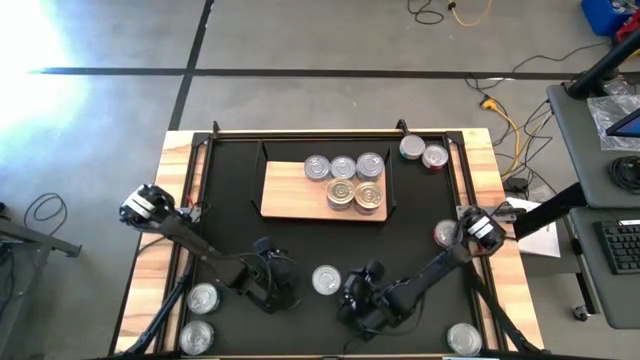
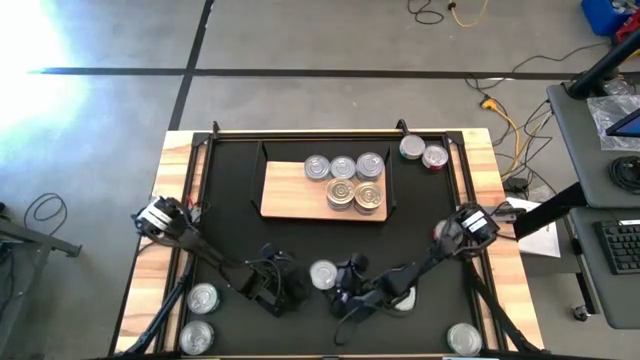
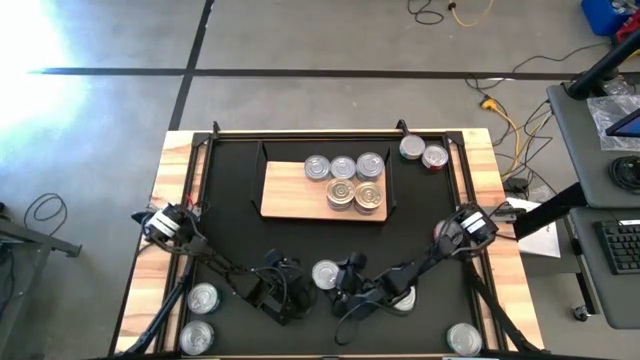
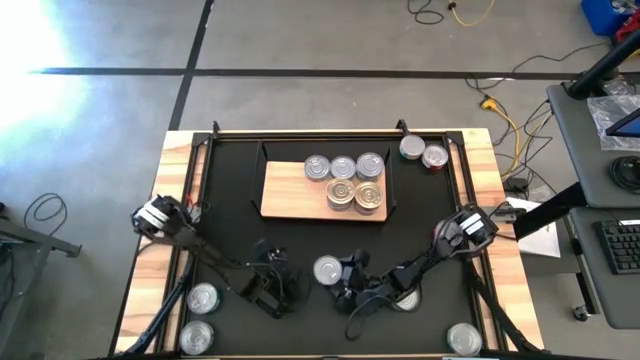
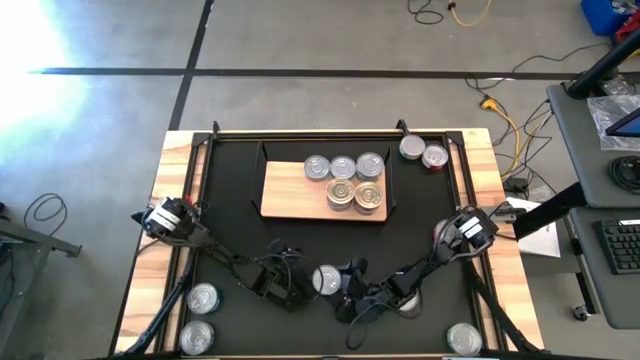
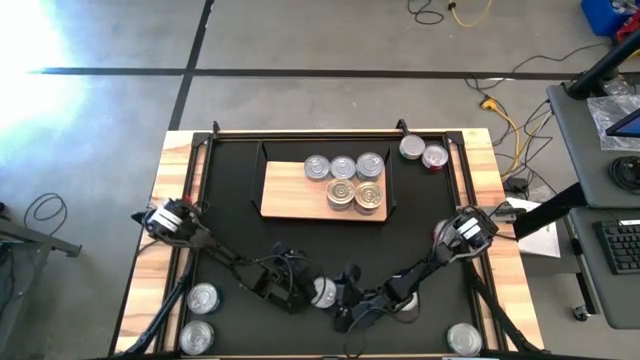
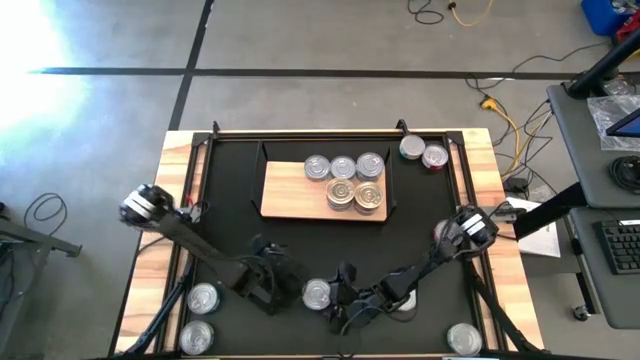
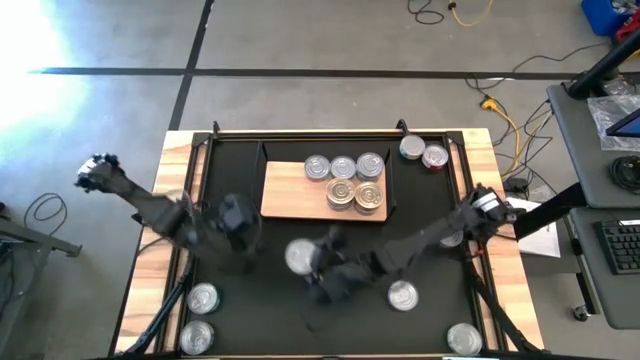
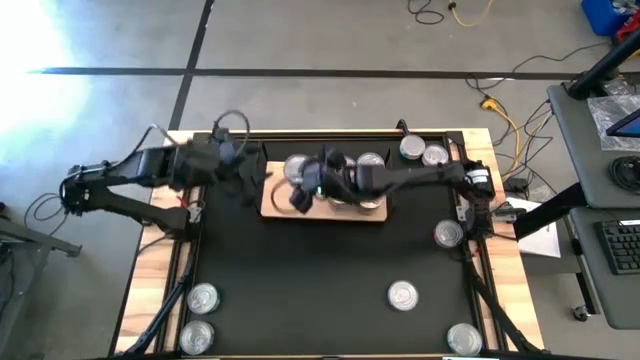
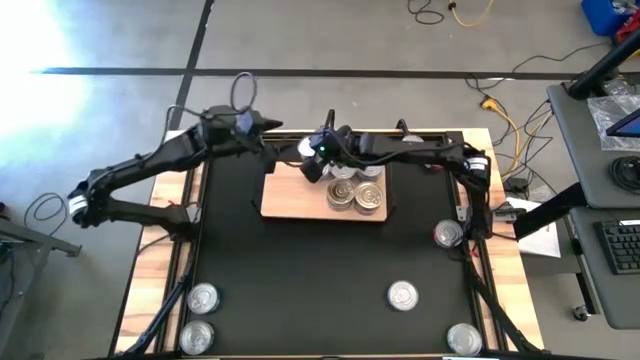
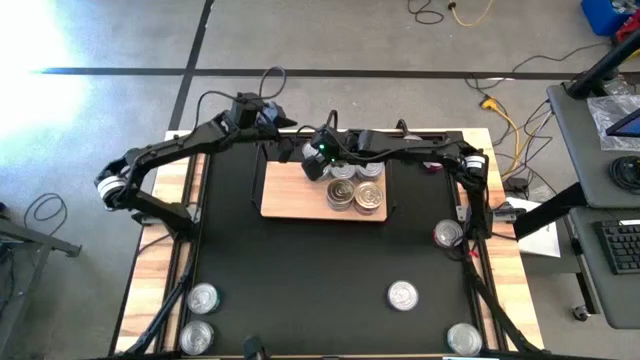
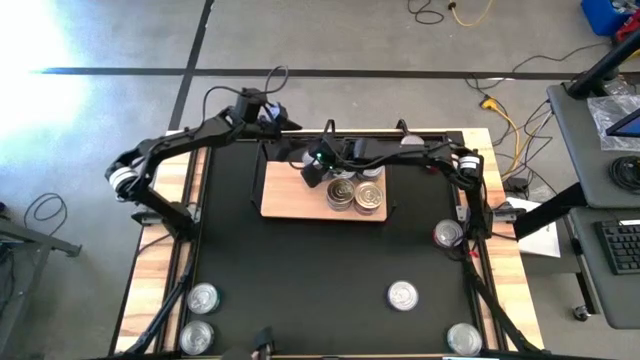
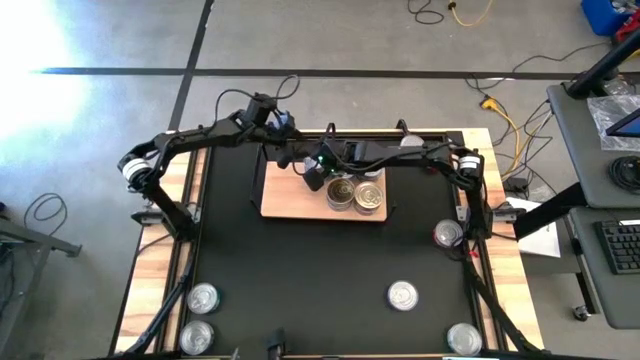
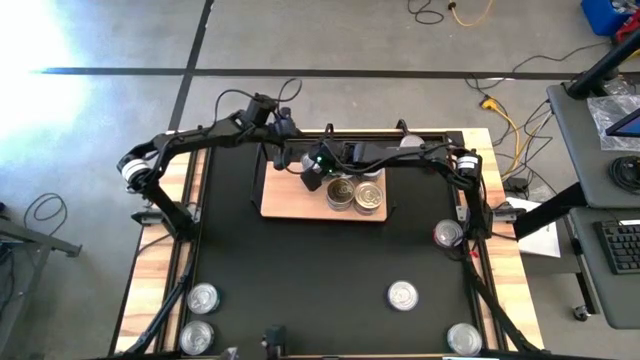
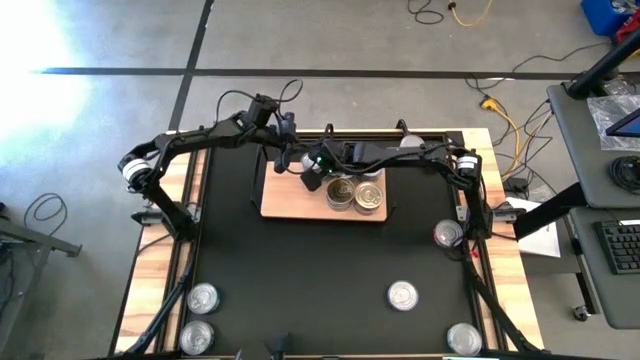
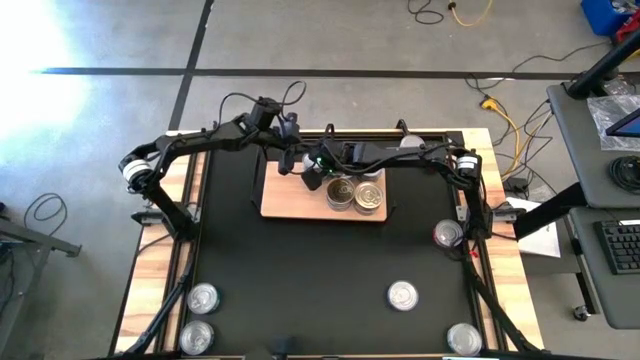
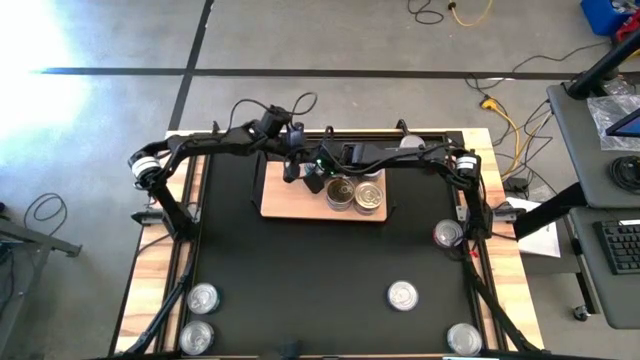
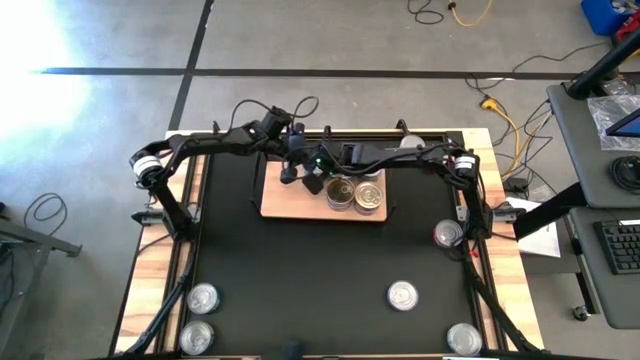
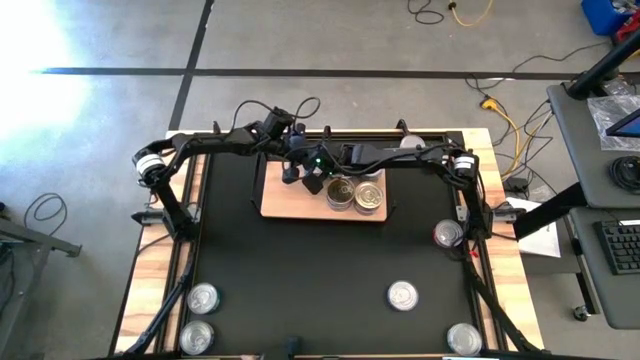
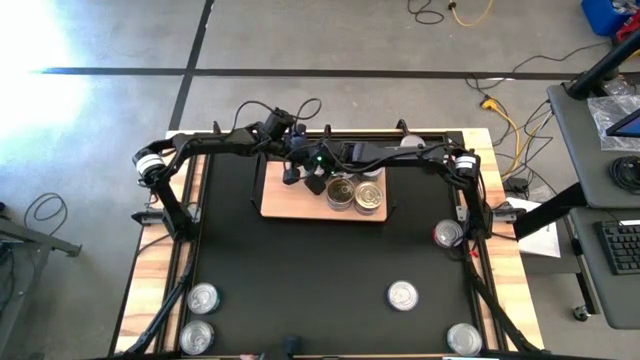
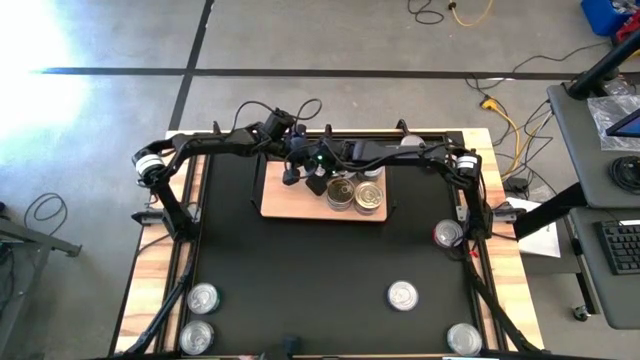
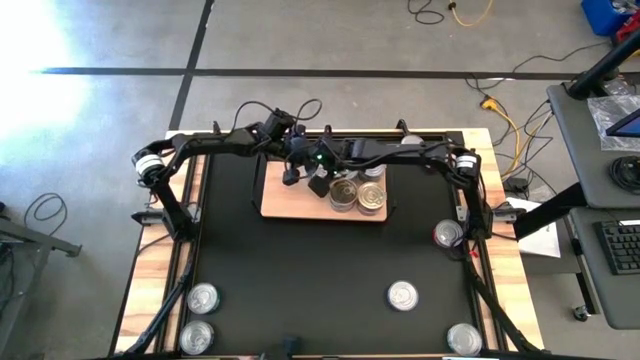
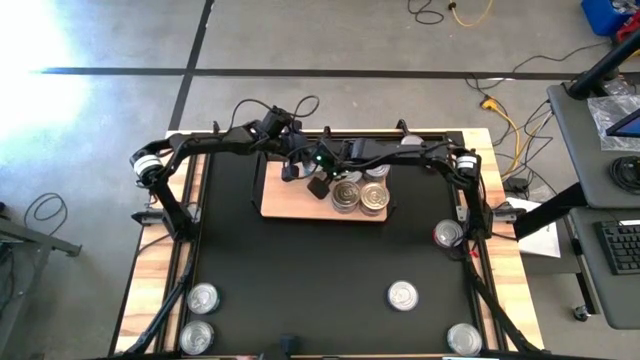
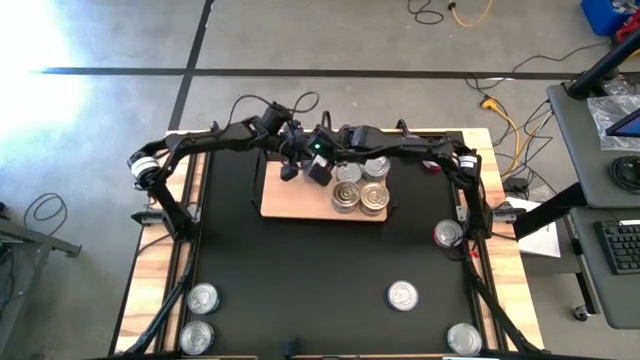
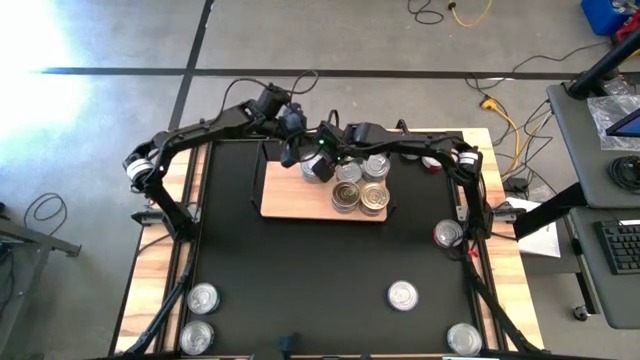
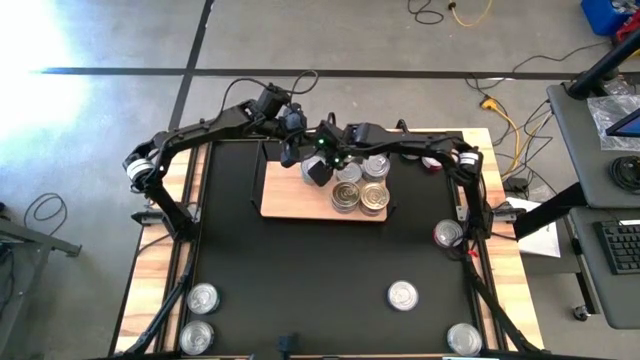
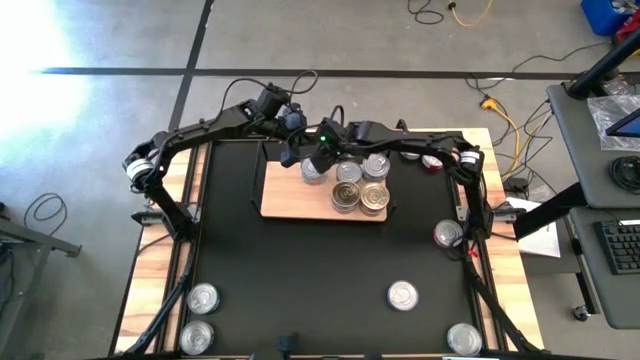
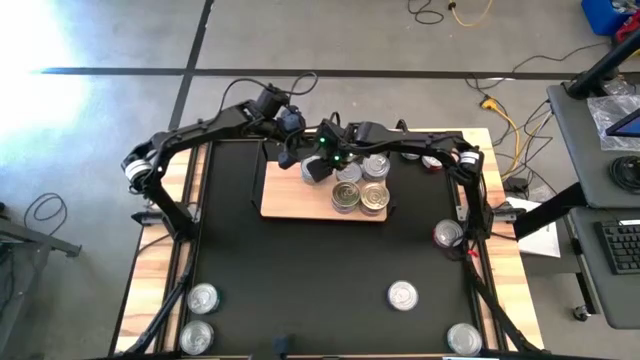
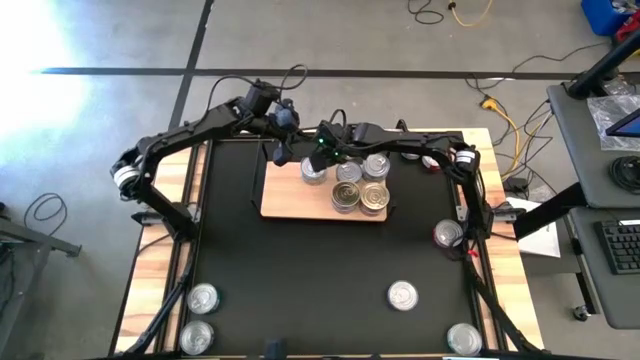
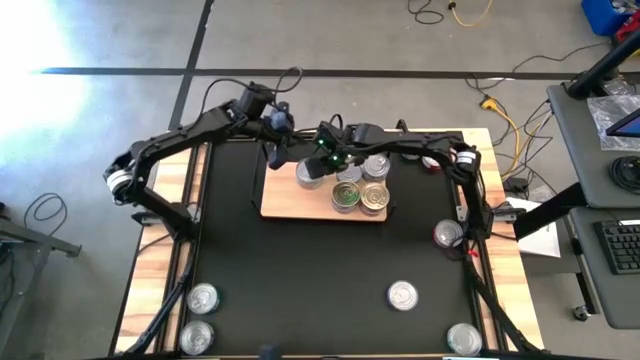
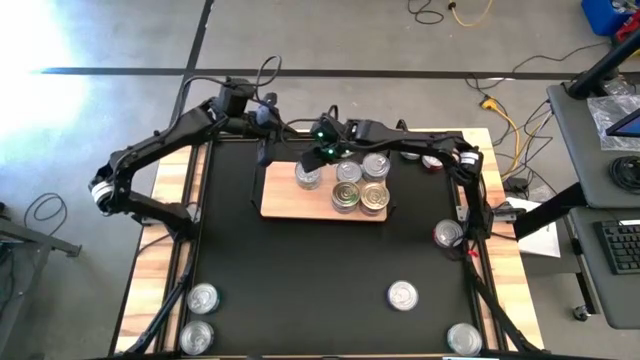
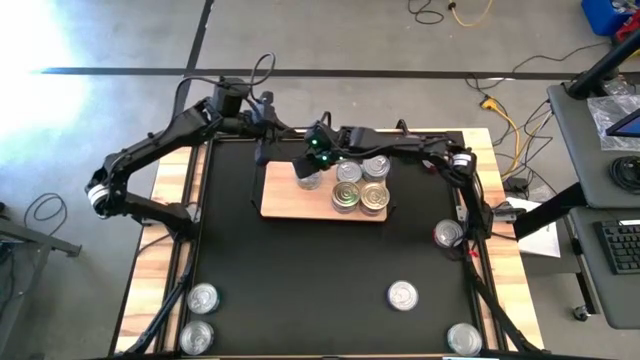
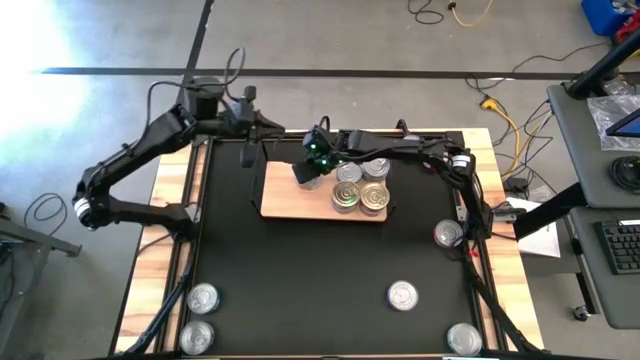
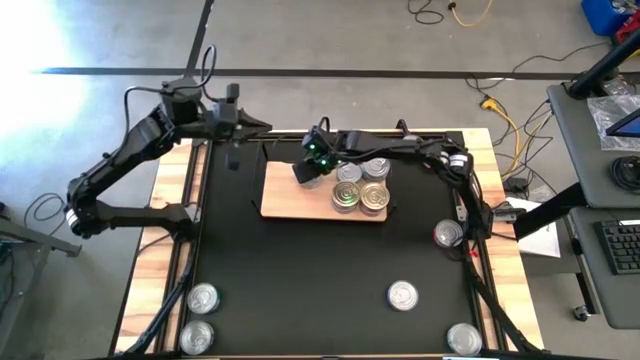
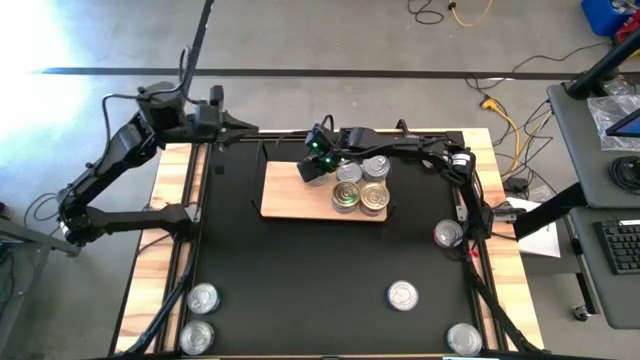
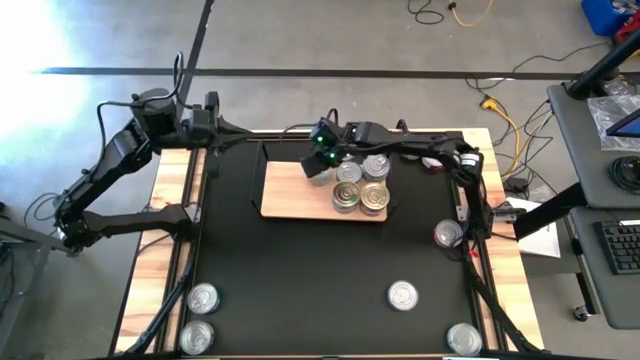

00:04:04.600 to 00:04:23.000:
Task: Stack canned seafood by type on shelf
Stack the top left light blue tuna can on the light blue tuna can

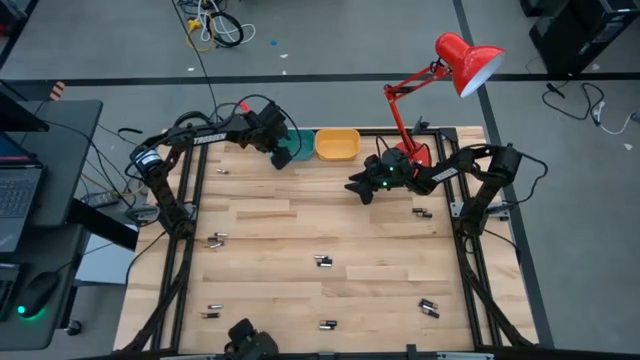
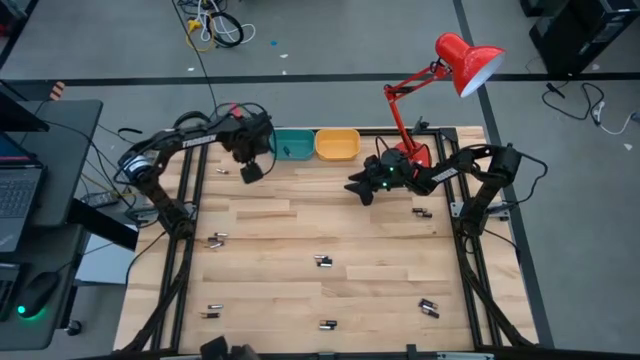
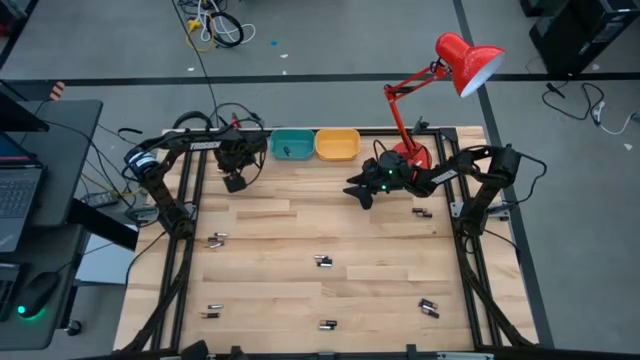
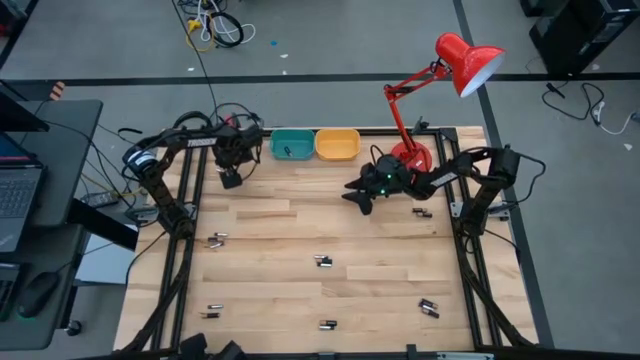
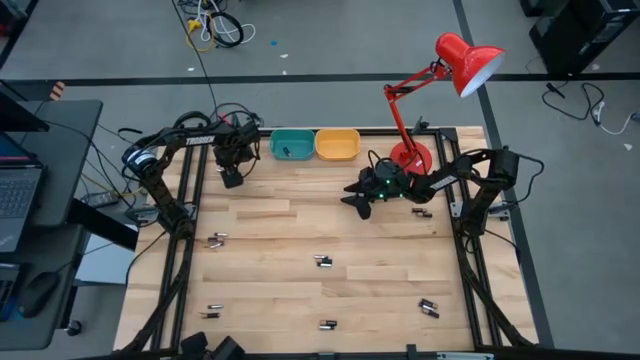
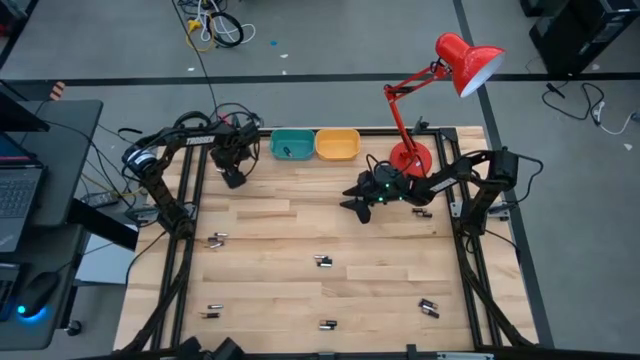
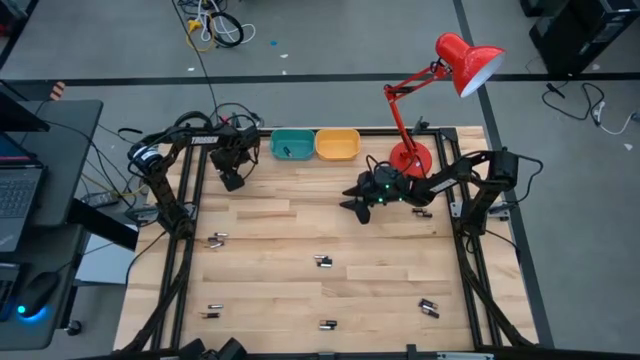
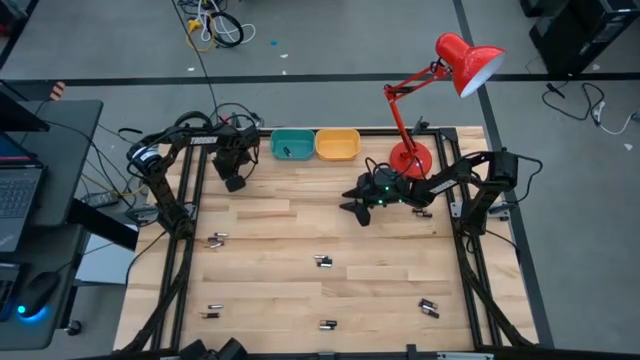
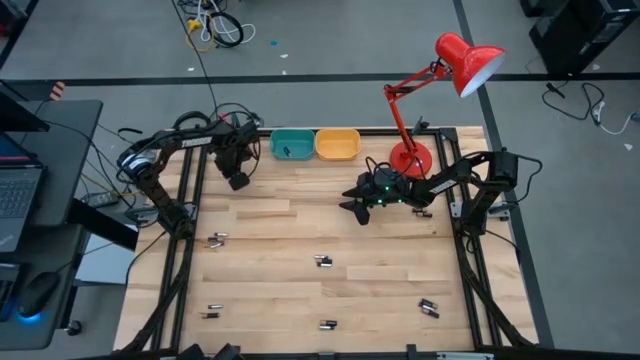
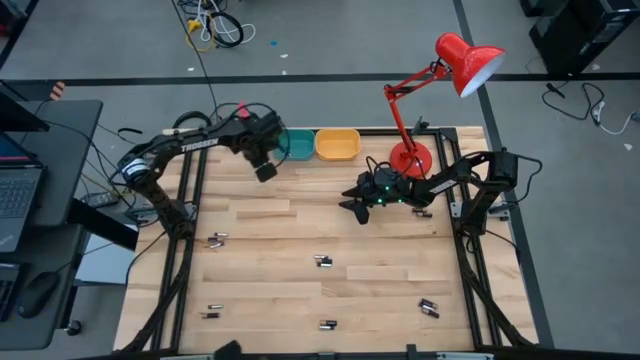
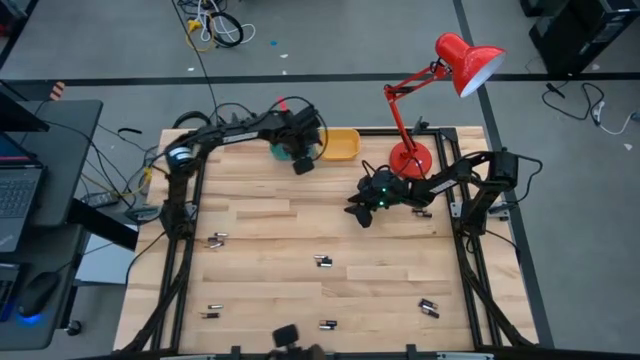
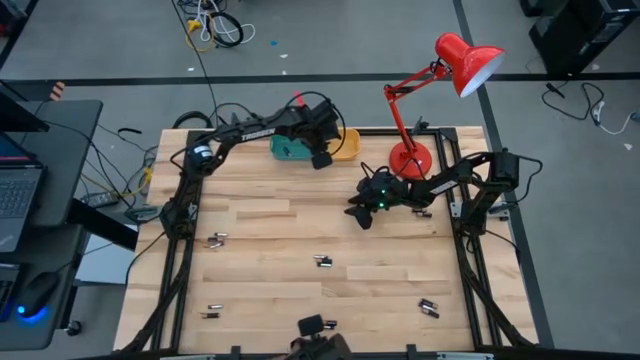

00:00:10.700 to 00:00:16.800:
Task: Sort batteries
Put the white battery into the yellow bin
